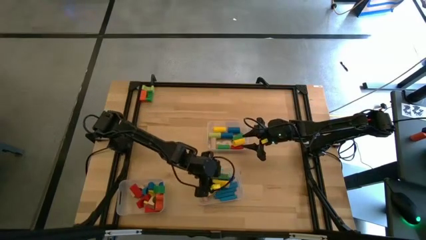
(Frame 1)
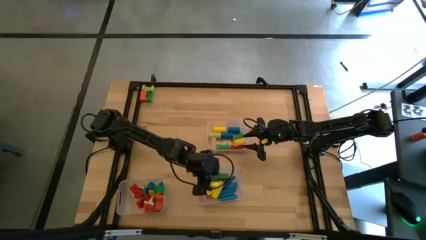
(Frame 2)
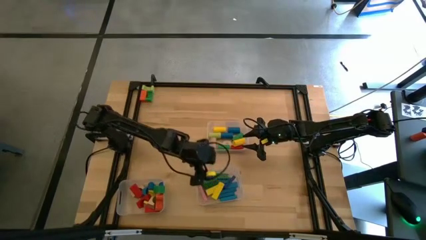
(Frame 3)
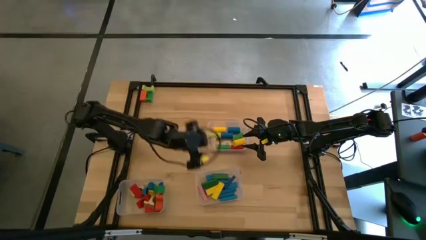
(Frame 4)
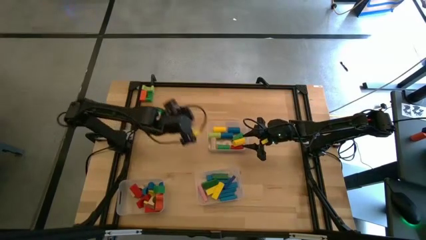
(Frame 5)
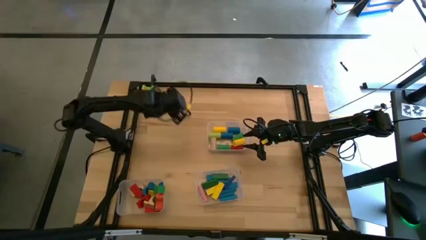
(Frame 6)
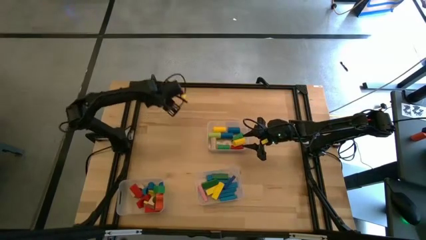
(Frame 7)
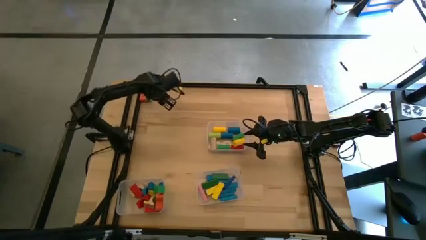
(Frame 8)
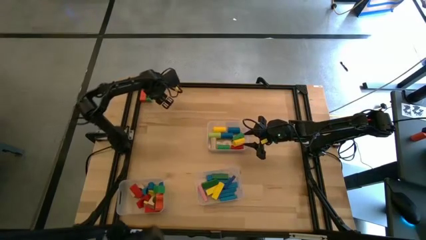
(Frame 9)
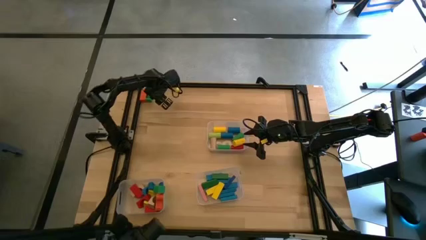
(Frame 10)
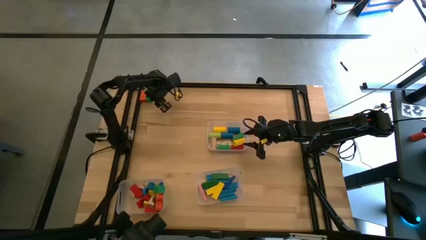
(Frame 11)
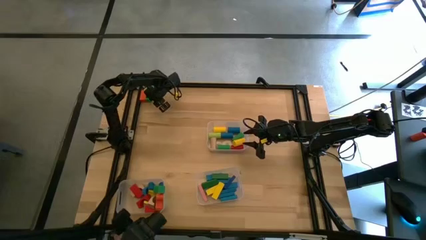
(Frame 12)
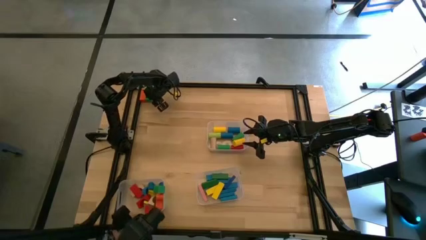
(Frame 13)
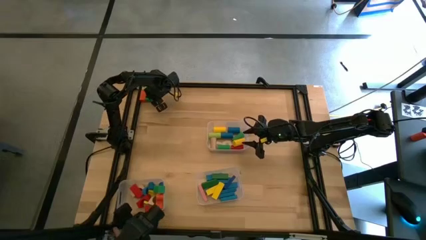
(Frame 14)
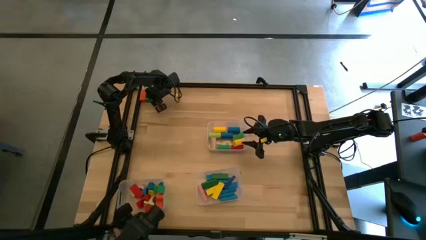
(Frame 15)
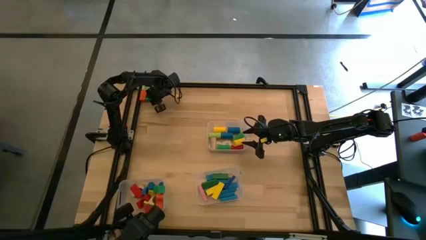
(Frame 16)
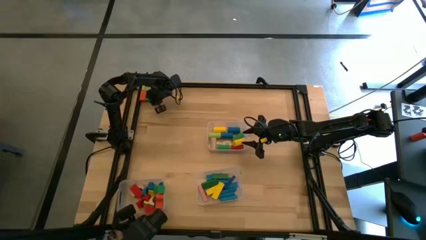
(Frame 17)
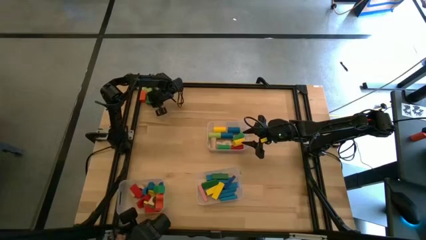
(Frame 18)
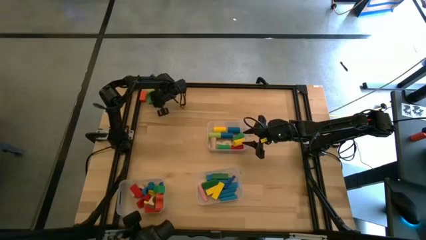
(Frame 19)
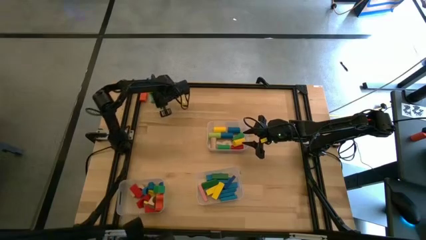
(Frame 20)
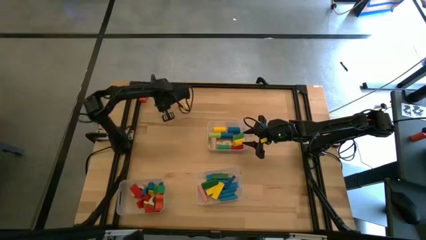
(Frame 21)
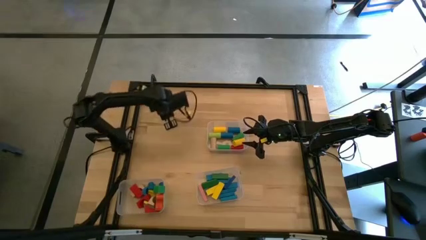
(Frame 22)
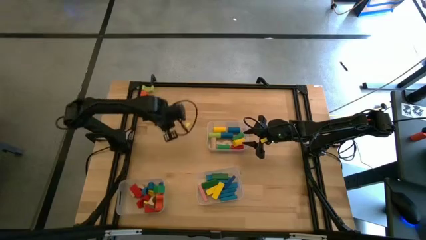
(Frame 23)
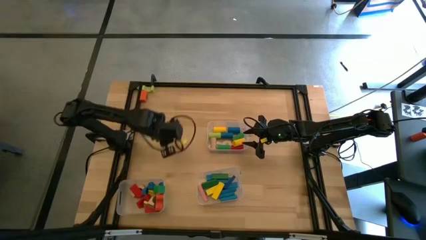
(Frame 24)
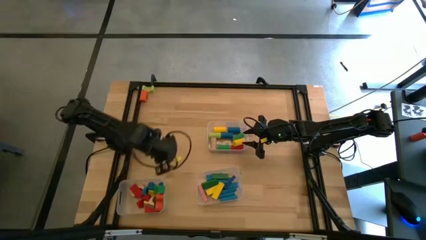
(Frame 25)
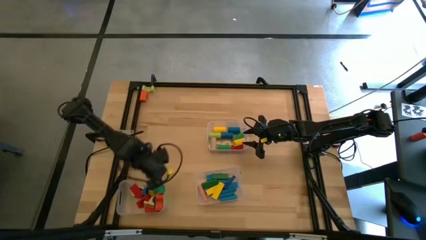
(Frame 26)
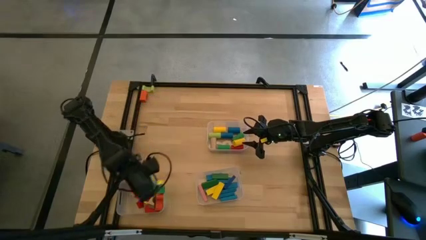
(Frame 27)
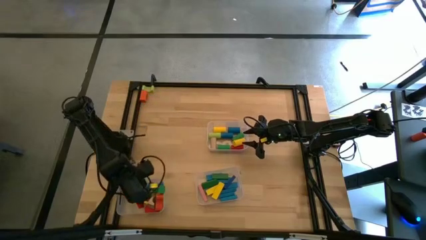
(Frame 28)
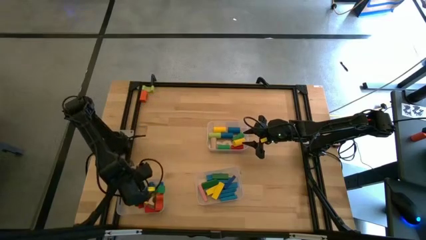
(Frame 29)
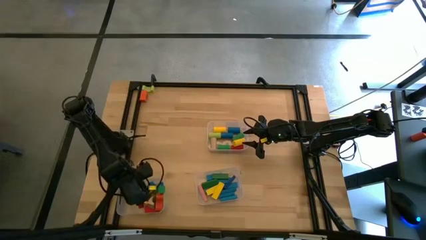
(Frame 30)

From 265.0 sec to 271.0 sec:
Task: Sort blocks by size
Put the green arch block into the bottom left transparent bin

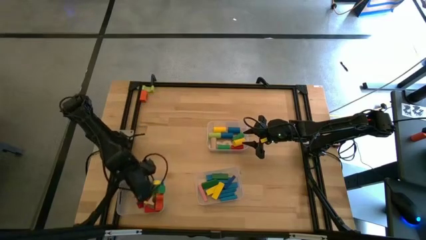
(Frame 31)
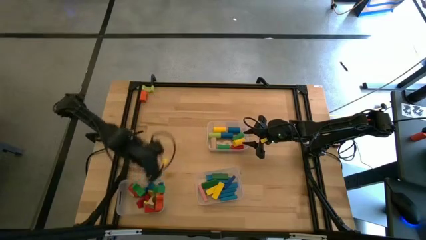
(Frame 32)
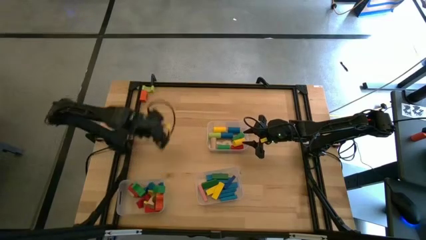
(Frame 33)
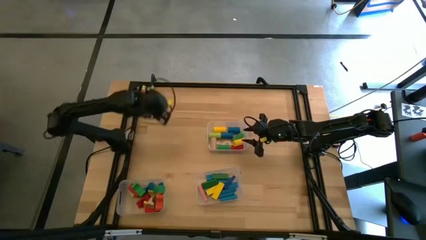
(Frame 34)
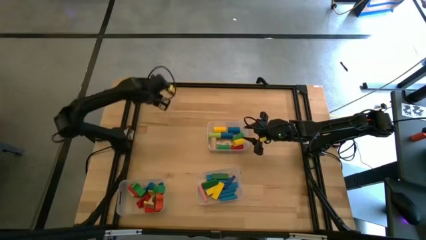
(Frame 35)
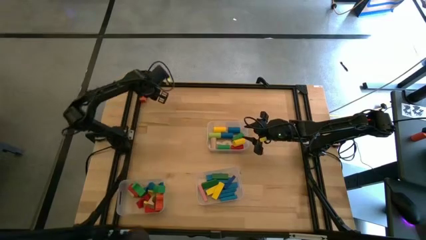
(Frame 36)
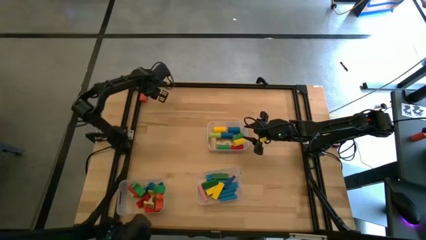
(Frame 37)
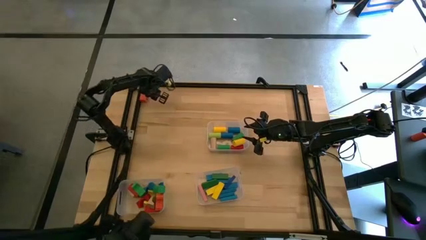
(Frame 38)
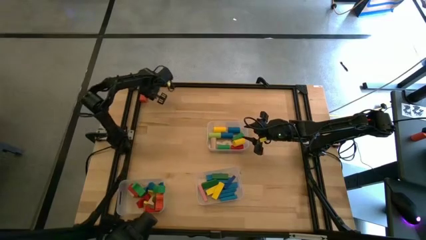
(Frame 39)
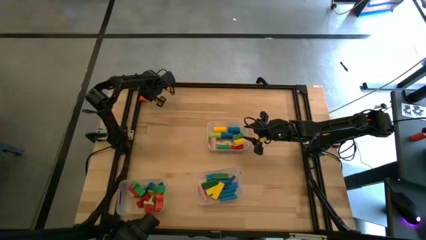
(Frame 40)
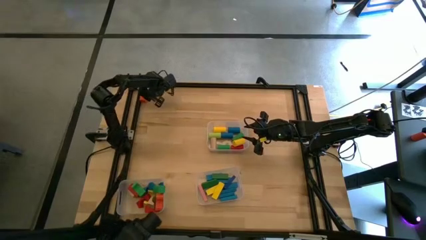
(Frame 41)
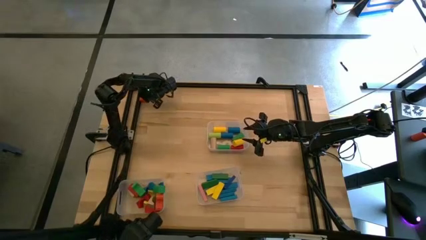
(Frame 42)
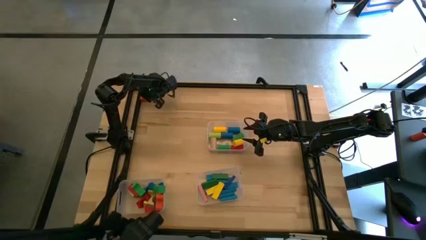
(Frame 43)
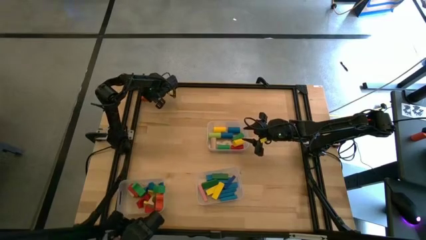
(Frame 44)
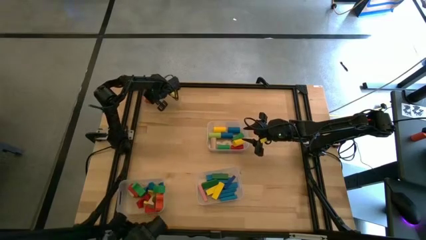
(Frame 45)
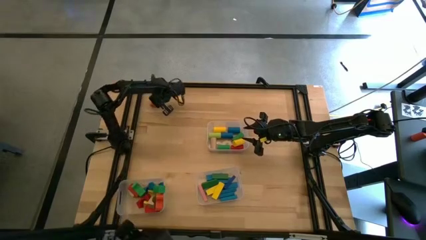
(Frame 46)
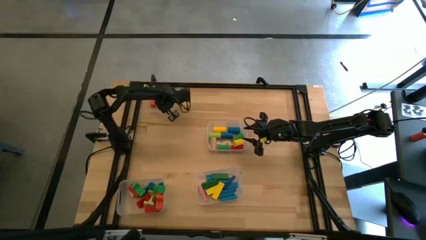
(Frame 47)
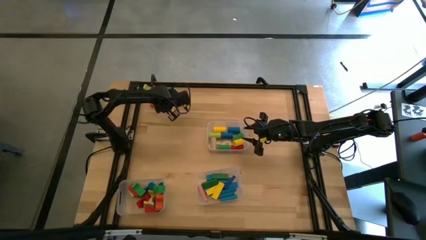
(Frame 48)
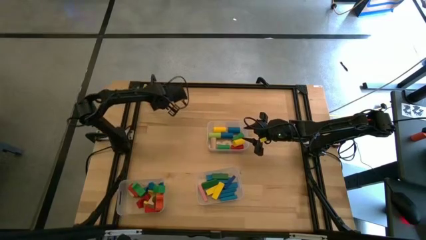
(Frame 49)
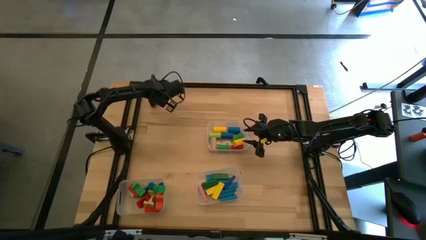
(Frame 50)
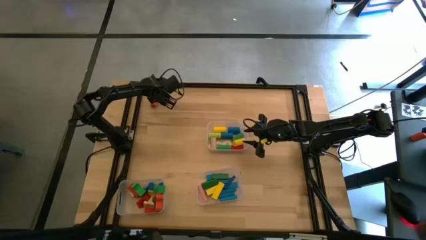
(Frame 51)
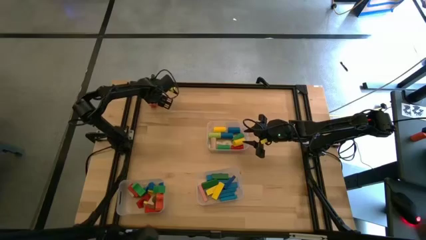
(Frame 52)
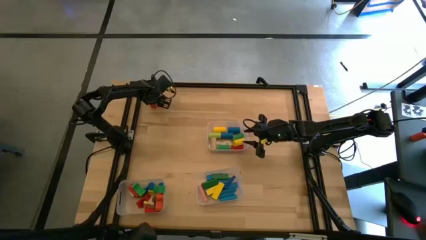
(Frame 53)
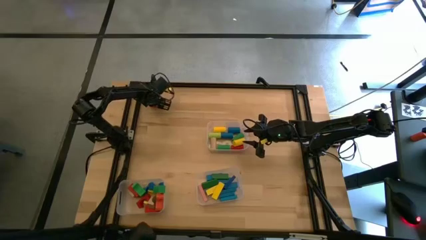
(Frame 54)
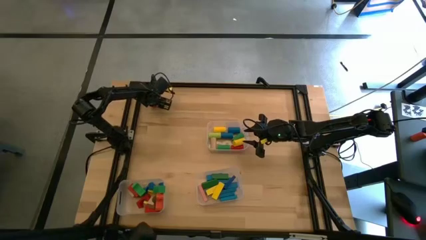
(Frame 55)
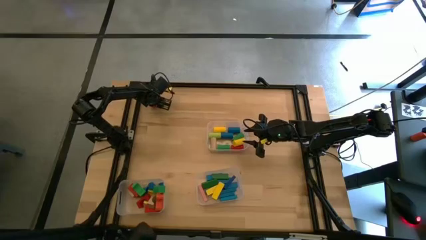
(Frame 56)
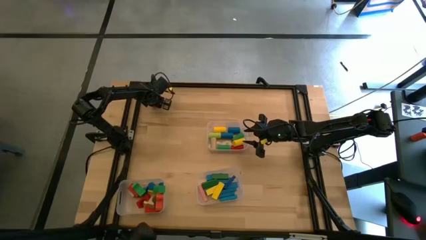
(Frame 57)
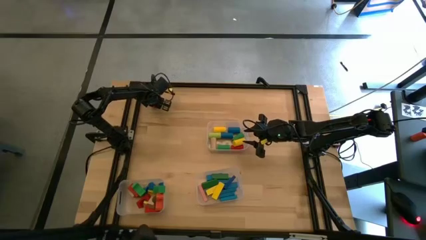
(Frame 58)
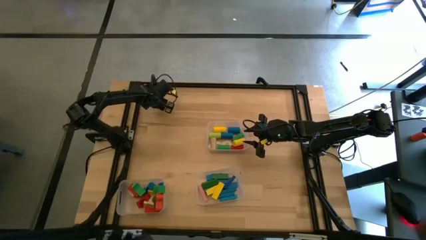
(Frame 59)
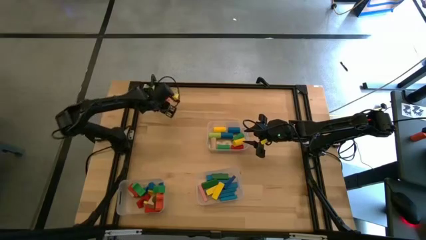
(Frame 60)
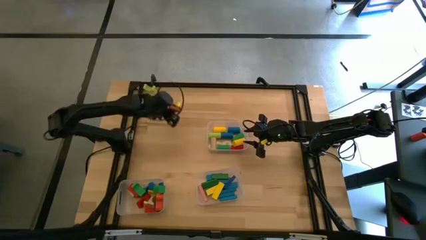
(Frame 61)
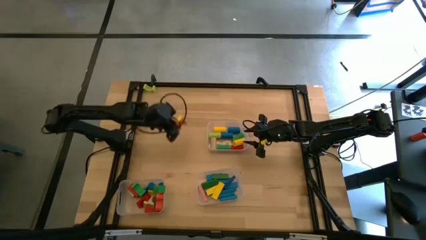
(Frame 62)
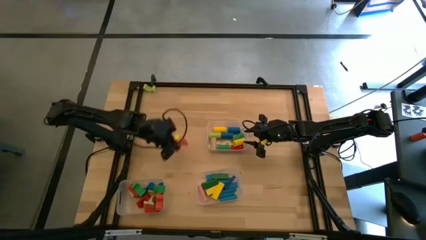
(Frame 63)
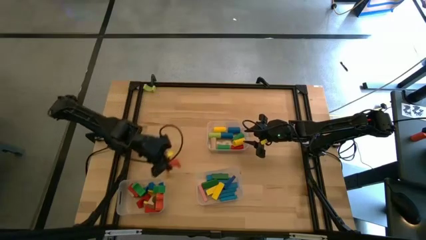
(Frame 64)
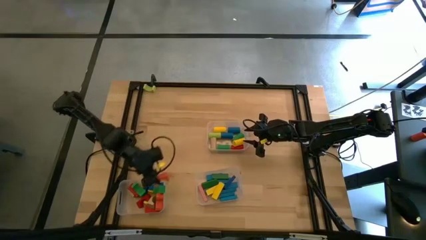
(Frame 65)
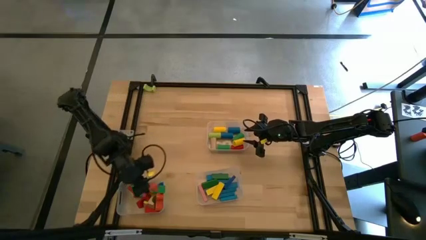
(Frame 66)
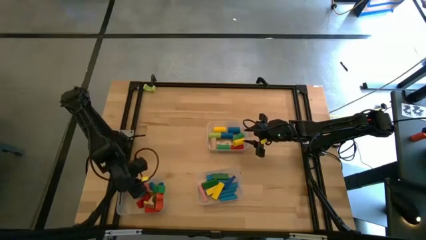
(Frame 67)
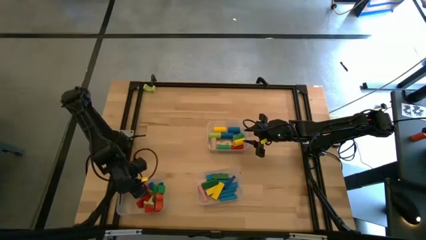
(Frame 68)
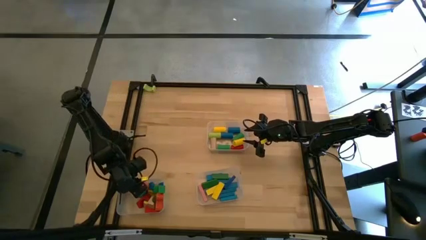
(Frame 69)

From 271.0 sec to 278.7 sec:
Put the orange arch block into the bottom left transparent bin

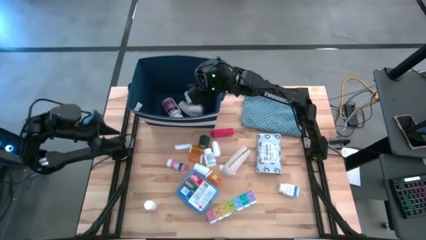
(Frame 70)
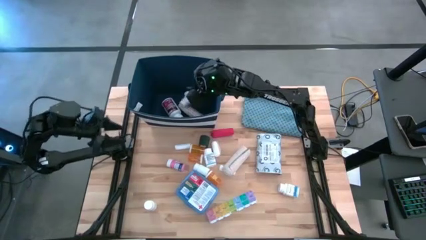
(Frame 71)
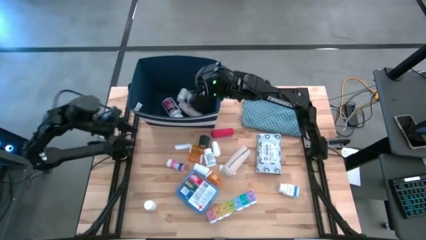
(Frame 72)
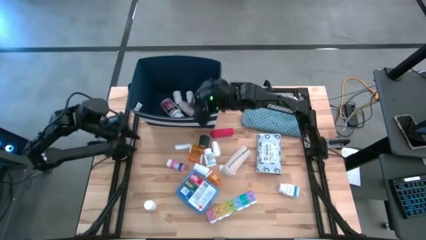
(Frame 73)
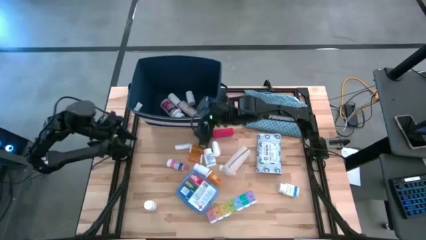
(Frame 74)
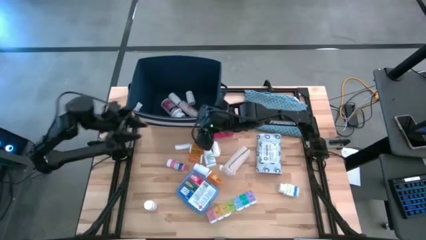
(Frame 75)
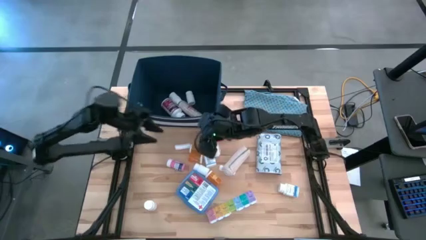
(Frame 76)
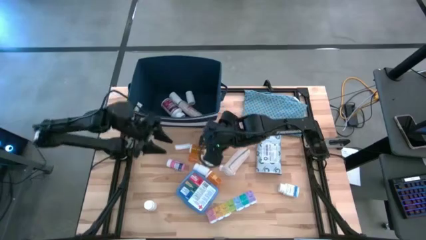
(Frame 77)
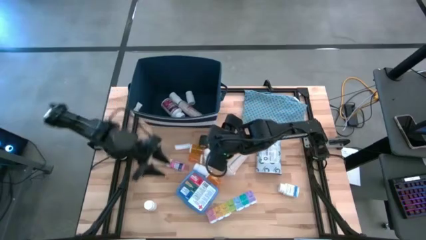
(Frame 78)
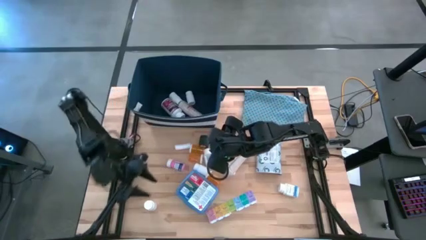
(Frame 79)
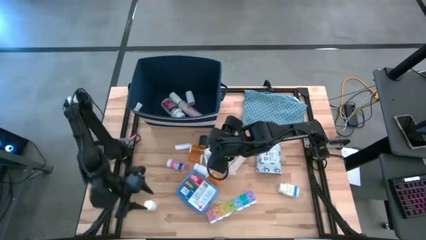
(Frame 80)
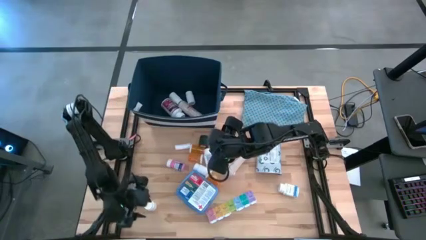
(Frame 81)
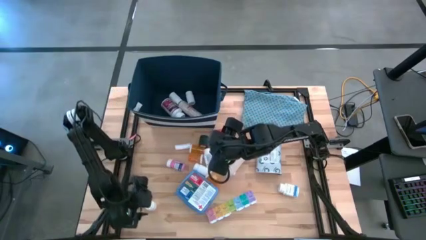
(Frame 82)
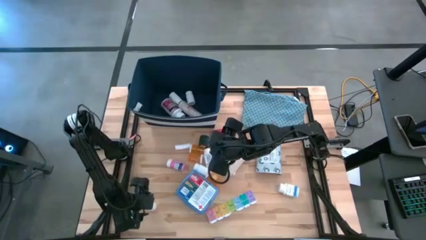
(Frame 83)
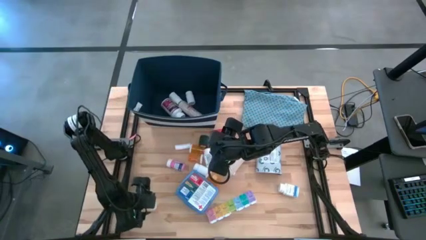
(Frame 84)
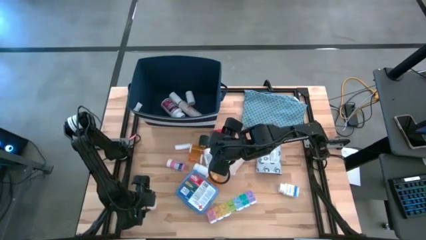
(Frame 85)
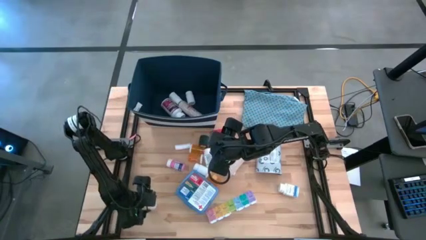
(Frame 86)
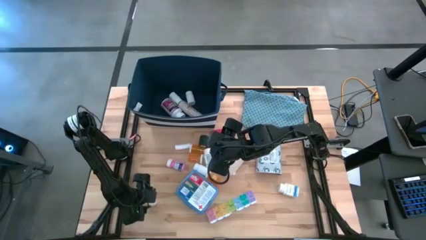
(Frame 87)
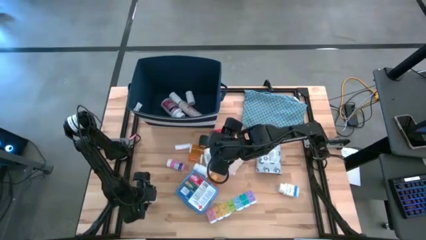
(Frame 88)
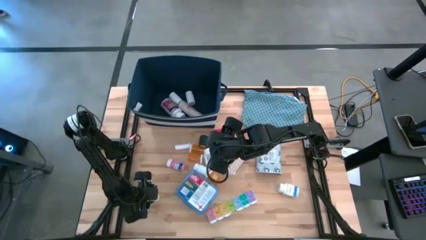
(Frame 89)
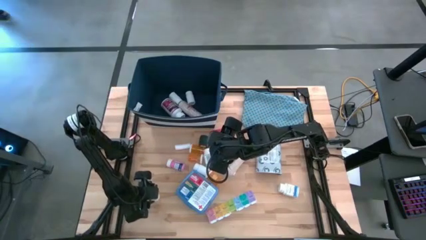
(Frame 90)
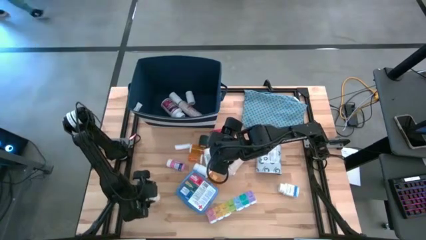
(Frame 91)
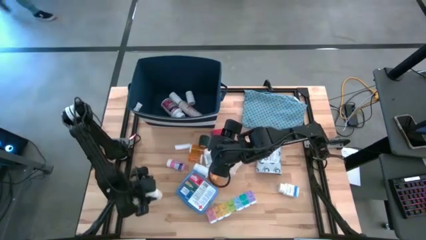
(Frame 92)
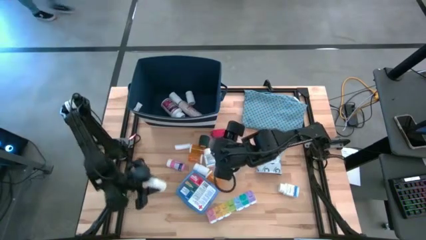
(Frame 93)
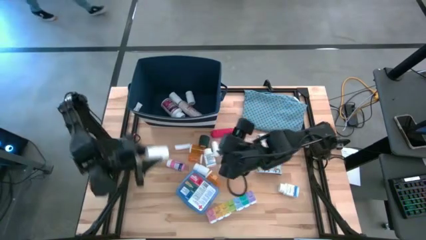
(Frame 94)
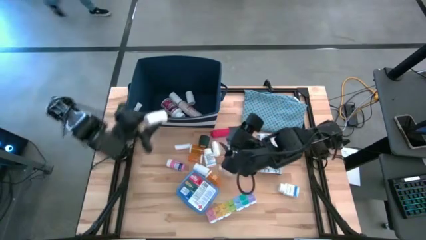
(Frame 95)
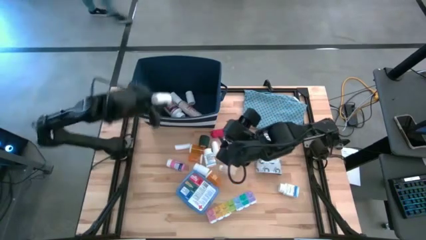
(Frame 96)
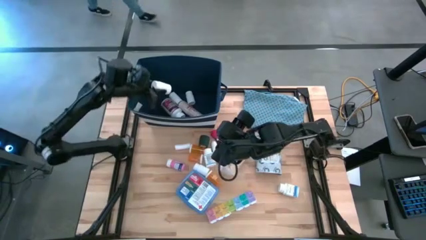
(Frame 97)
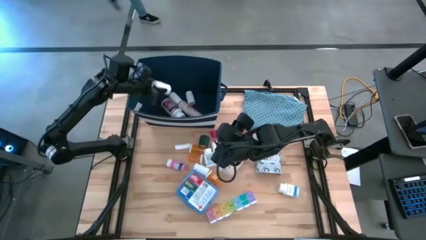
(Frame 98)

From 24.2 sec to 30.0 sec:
Task: Pick & place medical supplies in basket/bin
Put the white pill bottle into the blue bin
